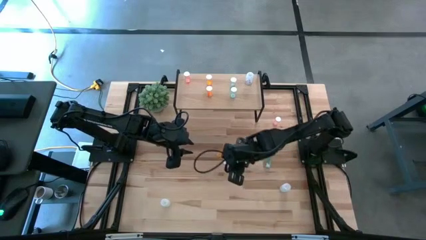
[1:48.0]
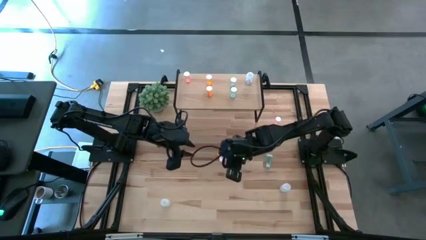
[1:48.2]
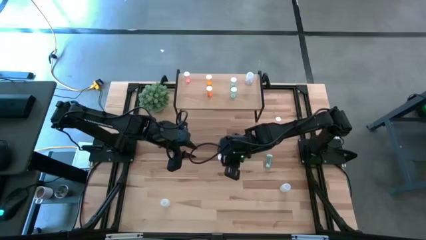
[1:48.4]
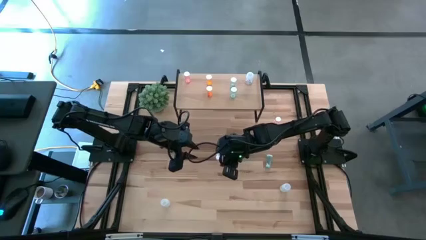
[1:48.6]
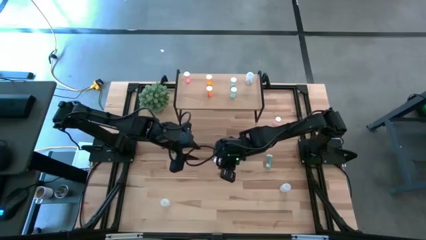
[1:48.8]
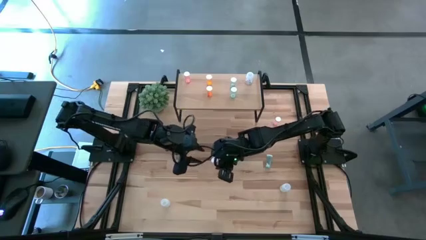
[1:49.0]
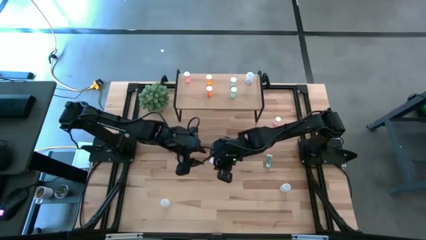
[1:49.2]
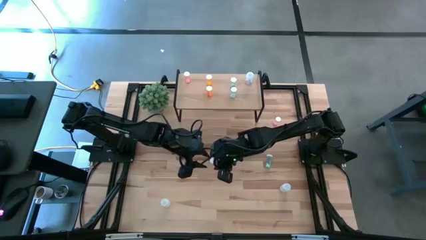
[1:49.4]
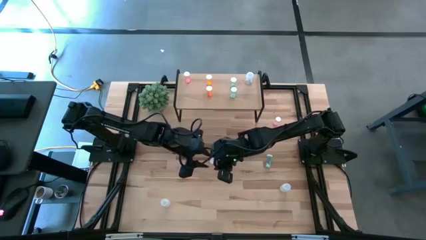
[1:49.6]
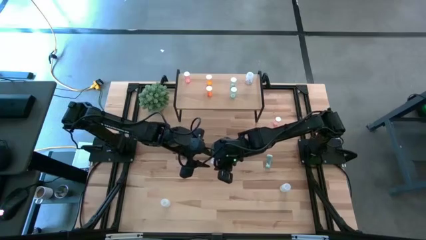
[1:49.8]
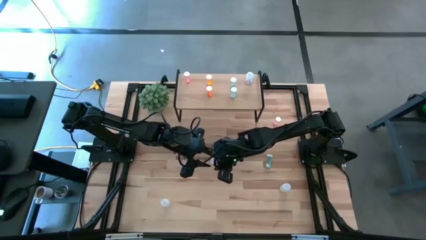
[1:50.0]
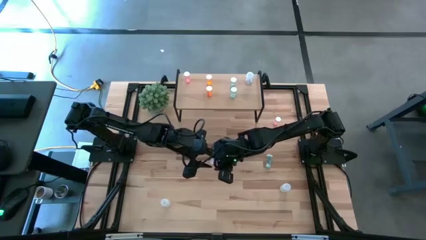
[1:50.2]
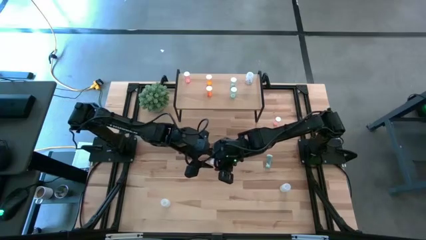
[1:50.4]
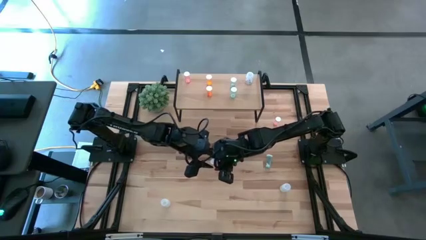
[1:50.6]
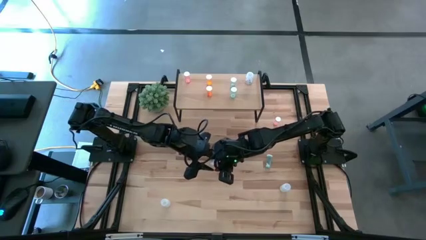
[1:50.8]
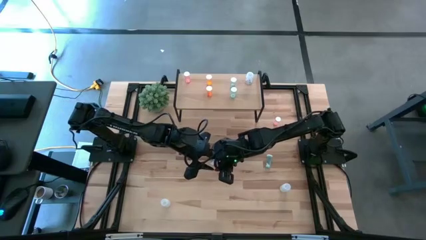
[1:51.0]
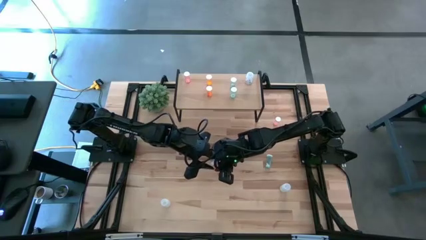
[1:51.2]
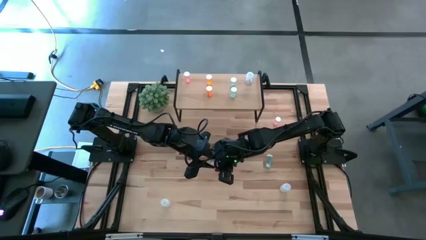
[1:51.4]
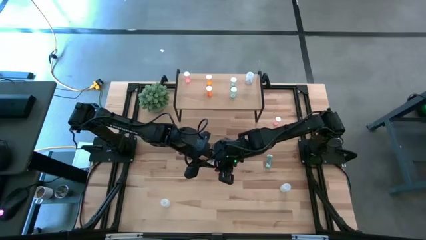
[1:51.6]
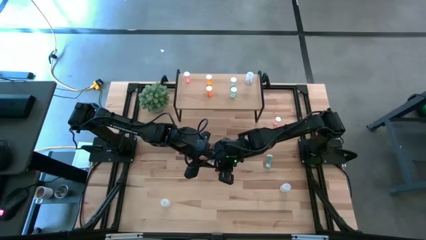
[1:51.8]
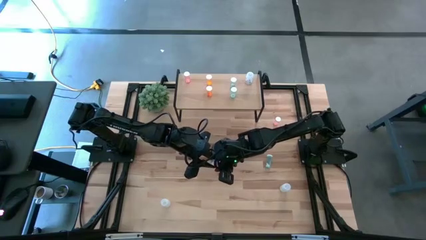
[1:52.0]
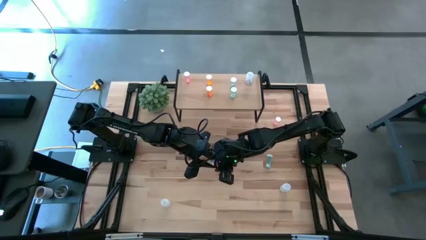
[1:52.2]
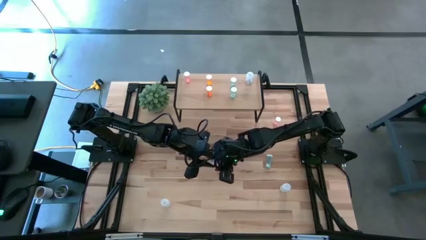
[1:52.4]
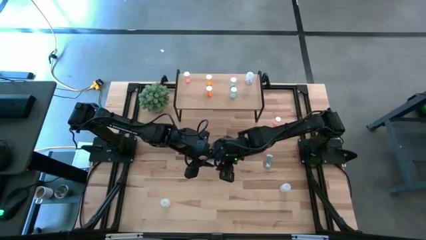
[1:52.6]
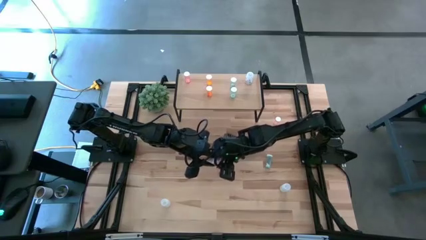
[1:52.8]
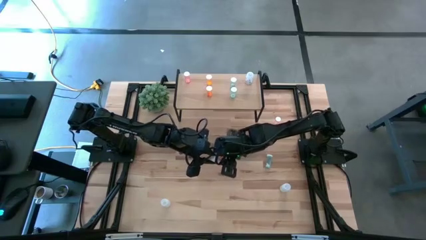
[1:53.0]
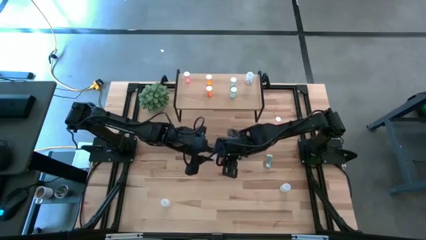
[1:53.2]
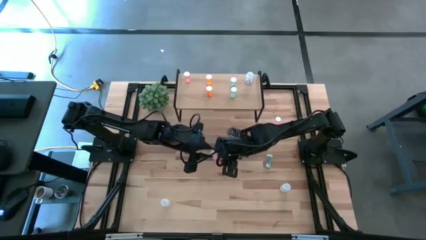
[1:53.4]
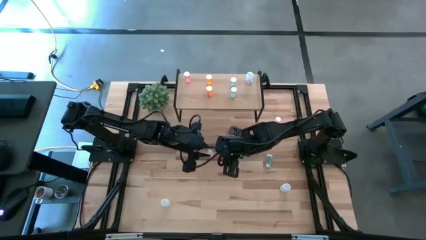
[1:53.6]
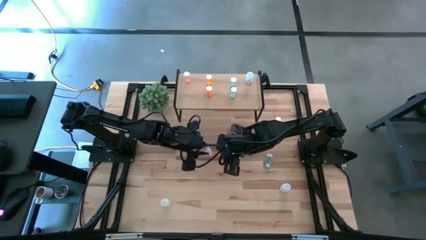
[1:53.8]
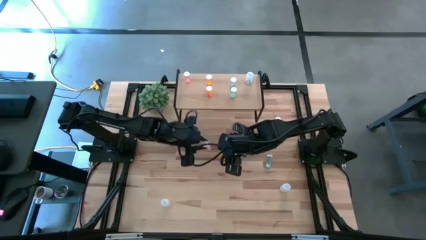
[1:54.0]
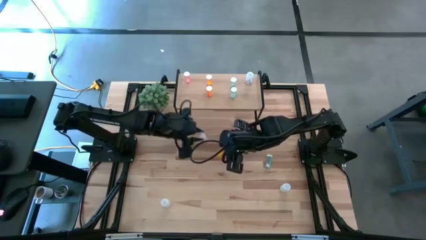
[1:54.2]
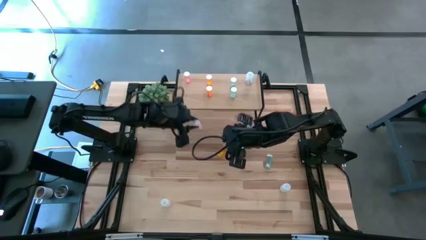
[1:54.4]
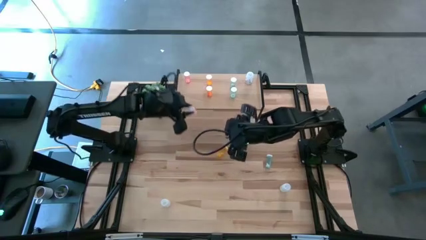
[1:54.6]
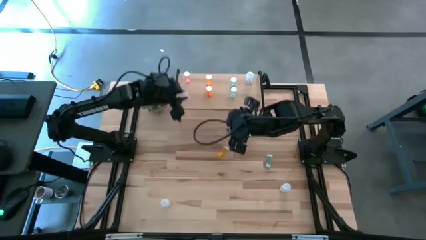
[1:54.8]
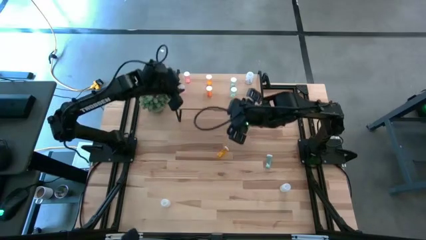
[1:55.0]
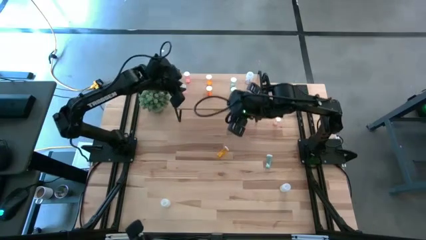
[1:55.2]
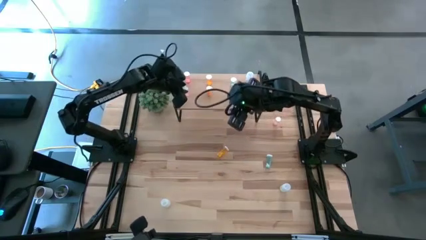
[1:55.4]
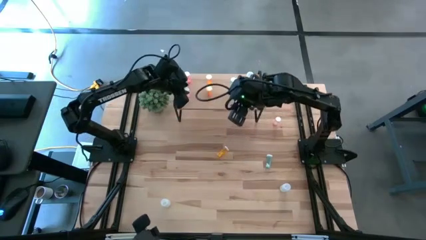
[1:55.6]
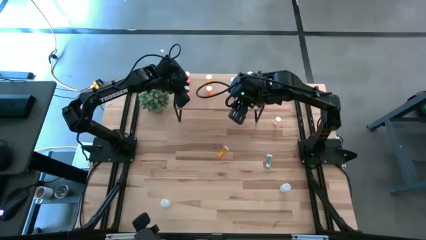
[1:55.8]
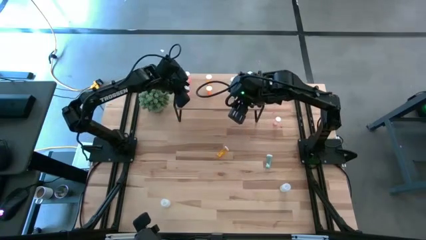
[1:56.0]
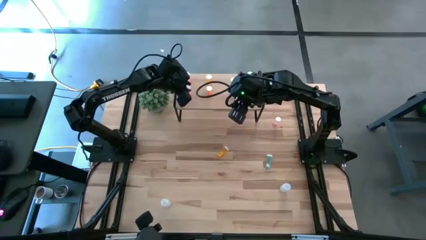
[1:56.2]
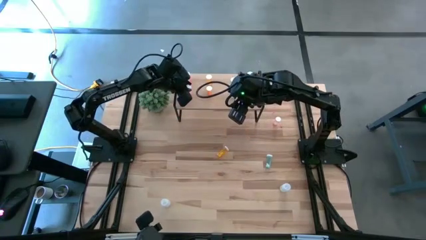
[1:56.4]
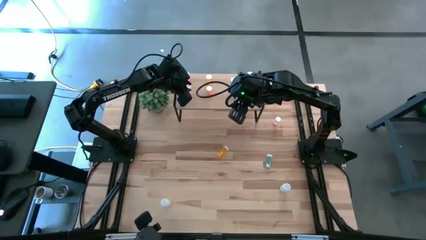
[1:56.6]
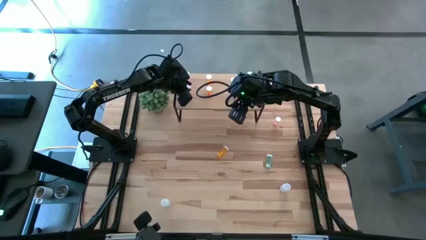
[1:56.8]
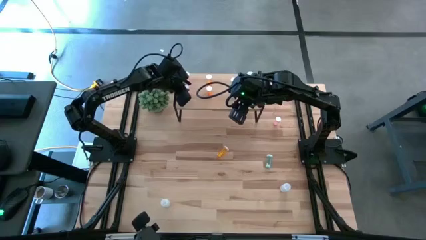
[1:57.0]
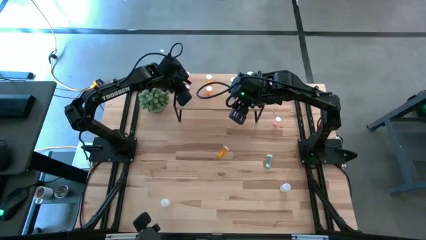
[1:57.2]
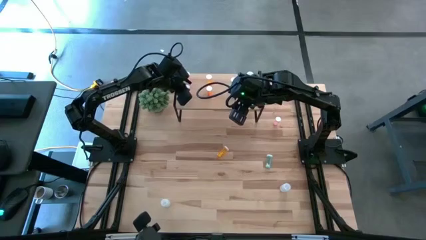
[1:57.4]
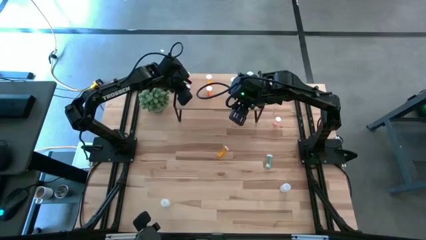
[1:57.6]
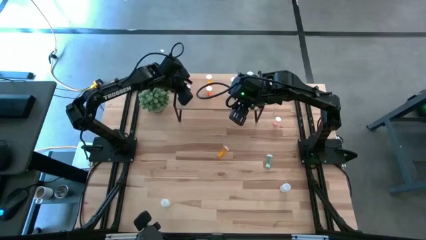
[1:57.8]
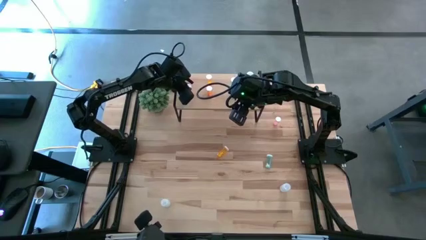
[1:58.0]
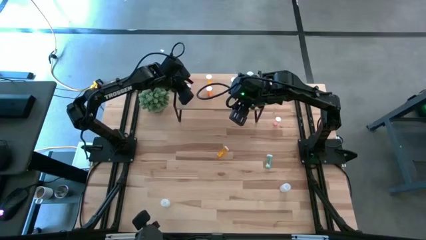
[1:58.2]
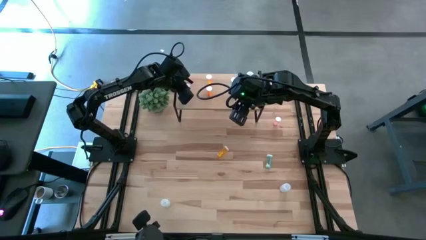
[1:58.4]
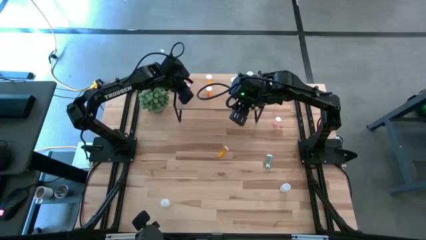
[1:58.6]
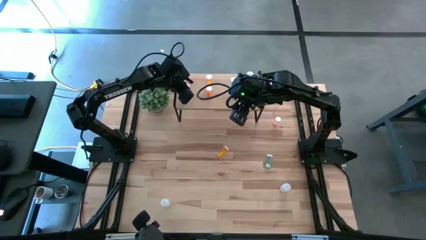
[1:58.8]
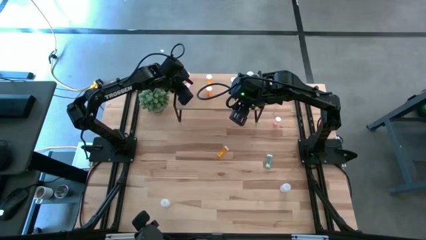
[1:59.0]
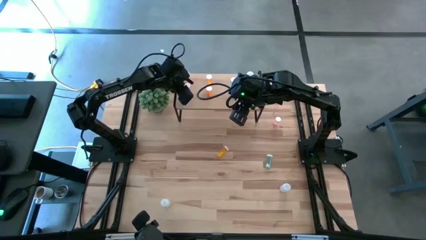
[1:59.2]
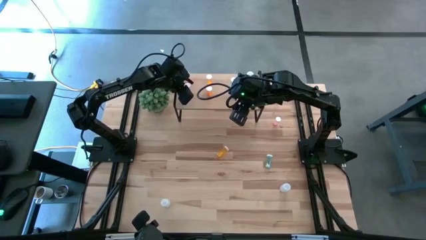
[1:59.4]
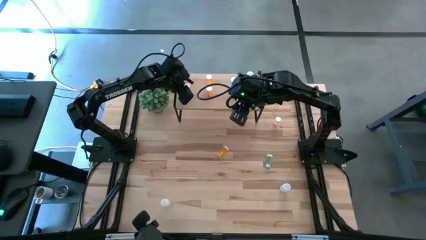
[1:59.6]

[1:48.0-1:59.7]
Task: Pick and place medicine bottles onto shelf by color
Put the bottom pink pill bottle on the shelf aligned with the other pink pill bottle

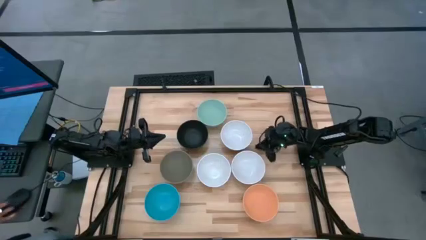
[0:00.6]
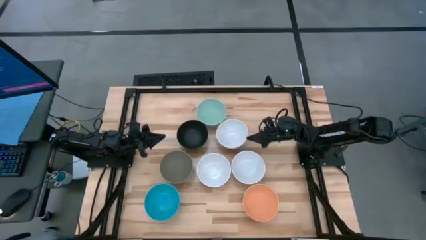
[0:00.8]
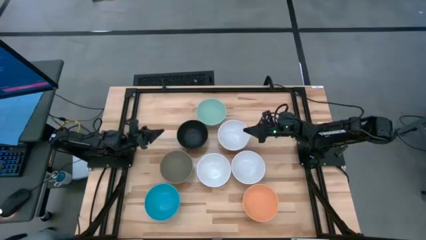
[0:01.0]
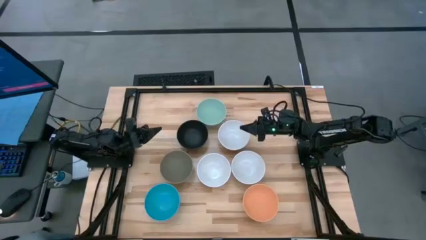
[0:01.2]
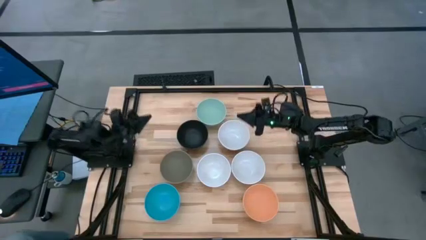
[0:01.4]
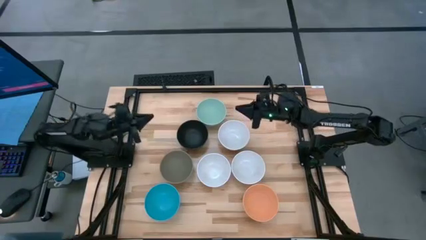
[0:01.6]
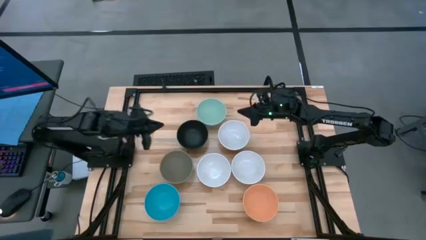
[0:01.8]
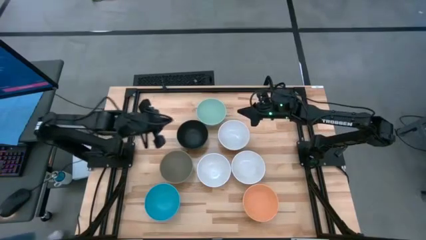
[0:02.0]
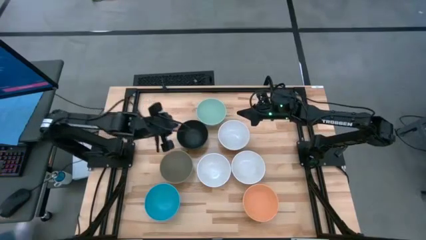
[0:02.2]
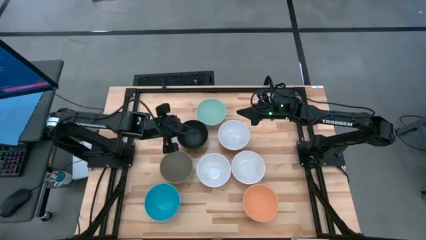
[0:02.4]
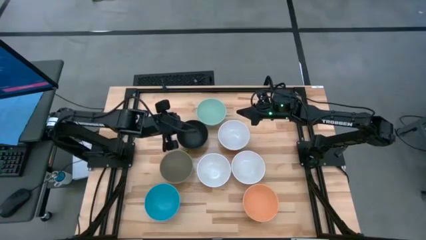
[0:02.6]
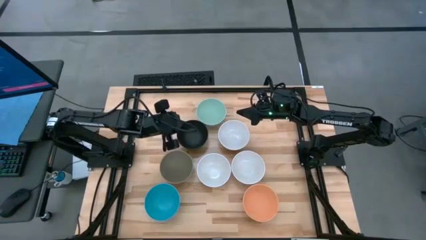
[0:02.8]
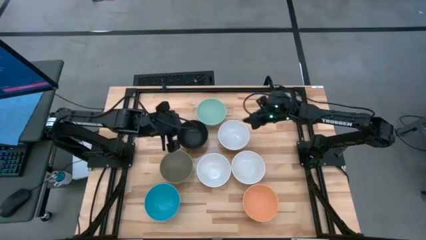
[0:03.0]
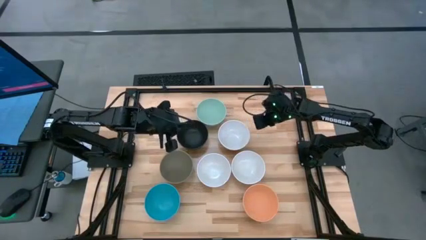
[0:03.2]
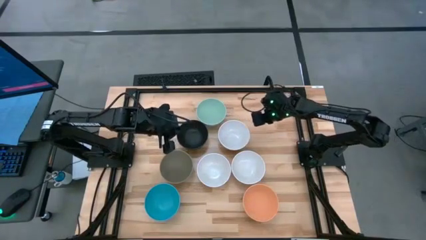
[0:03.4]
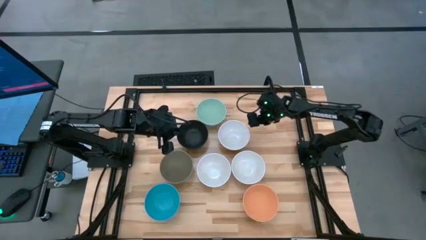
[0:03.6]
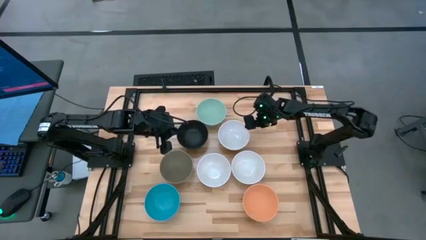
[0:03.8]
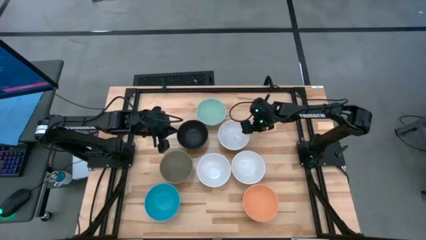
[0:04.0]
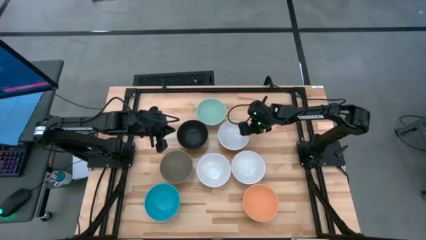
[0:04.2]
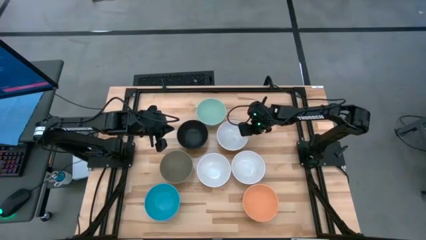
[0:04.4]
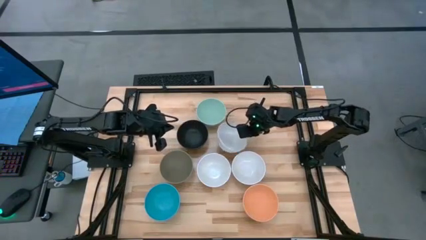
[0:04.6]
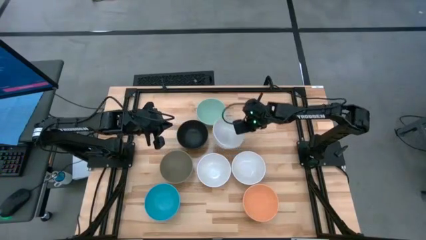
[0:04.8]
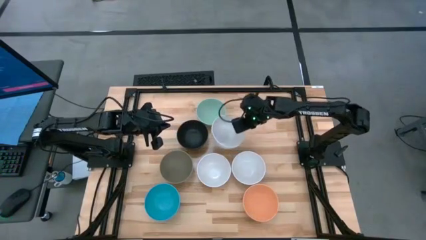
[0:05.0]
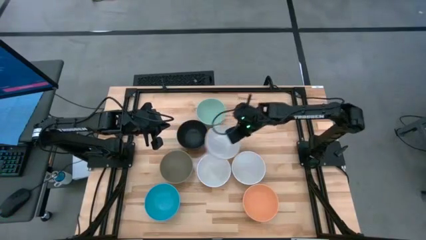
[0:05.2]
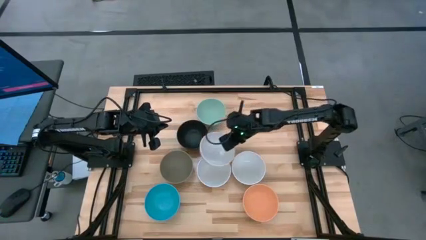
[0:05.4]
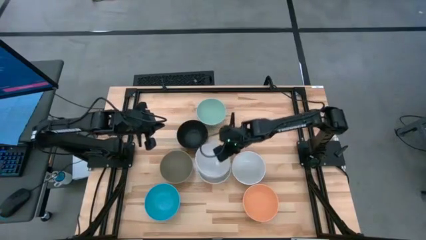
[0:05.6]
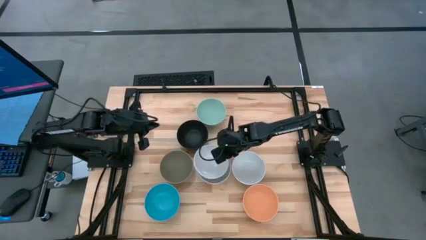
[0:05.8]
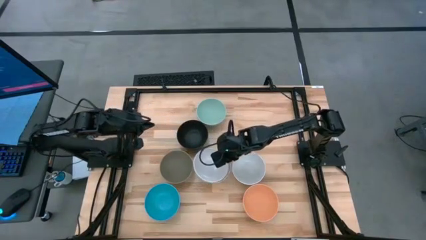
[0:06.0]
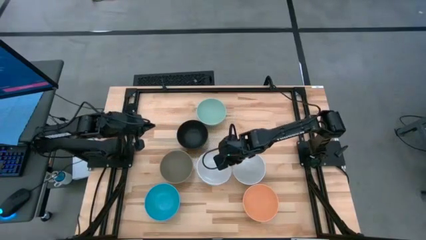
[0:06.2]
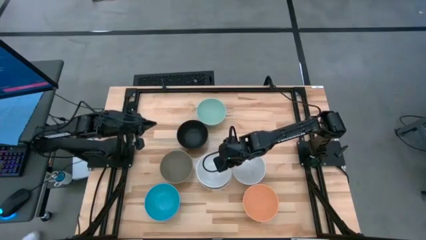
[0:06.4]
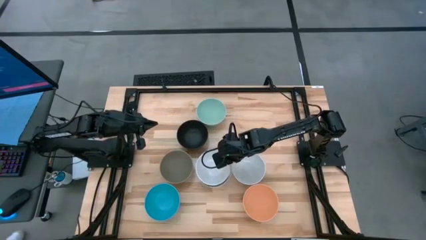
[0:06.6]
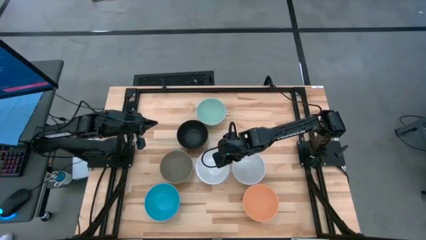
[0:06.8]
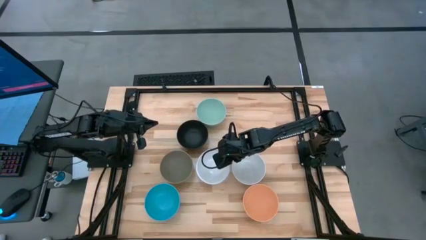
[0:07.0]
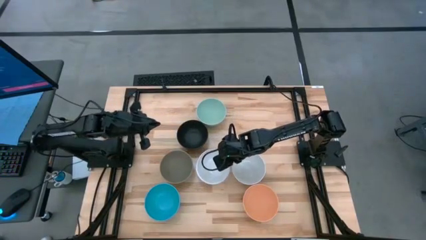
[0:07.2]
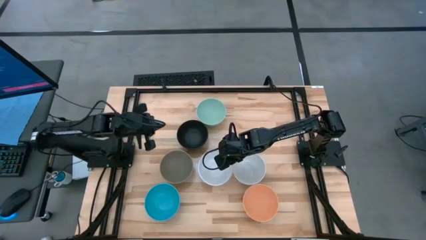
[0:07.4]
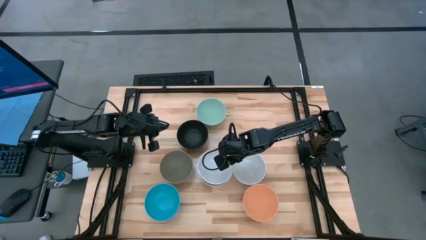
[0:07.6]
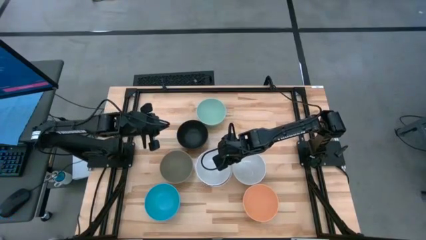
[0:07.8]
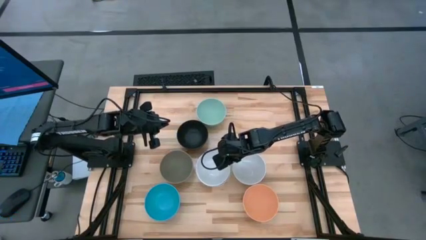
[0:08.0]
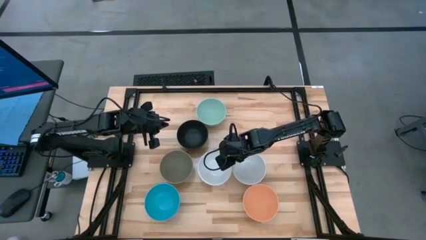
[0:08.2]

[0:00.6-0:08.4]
Task: Nest bowls inside each other
Stack the top white bowl on top of the left white bowl
